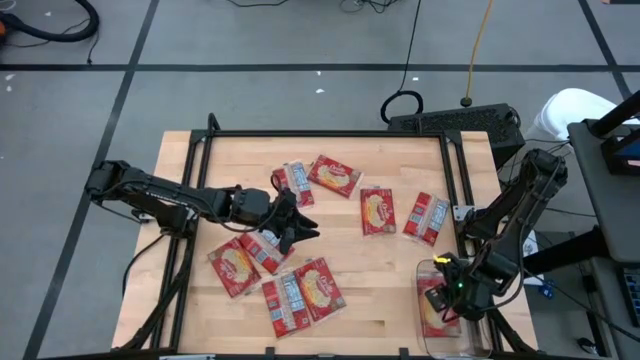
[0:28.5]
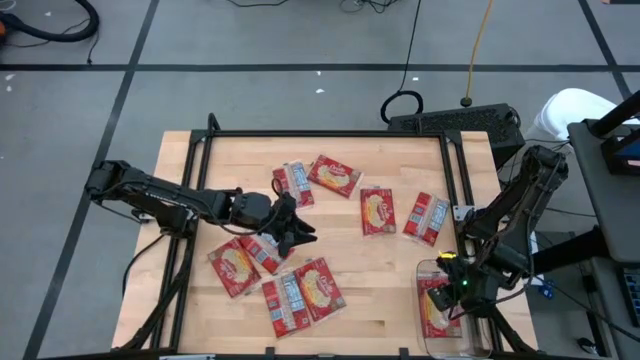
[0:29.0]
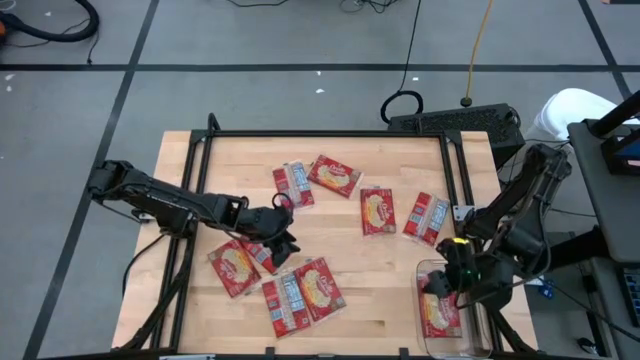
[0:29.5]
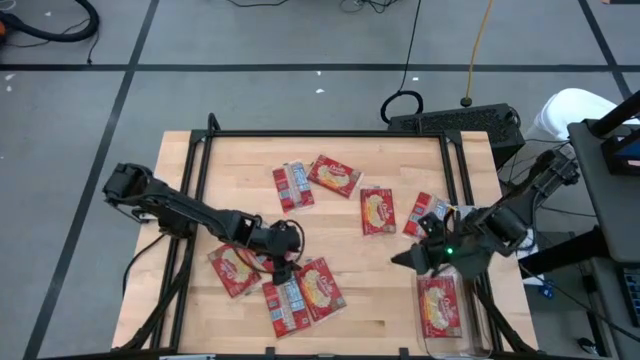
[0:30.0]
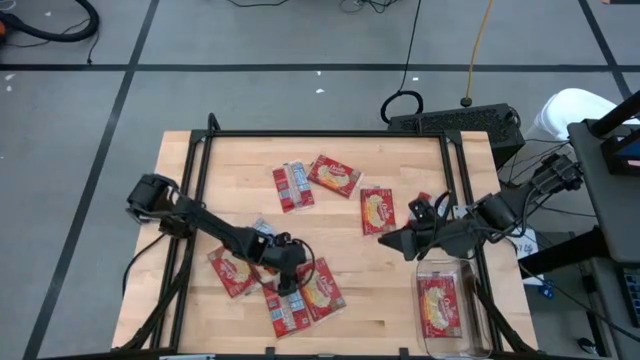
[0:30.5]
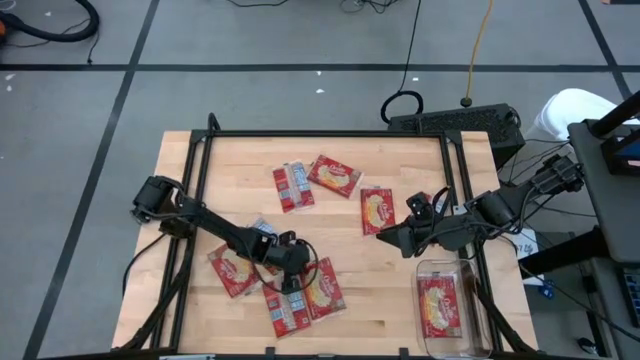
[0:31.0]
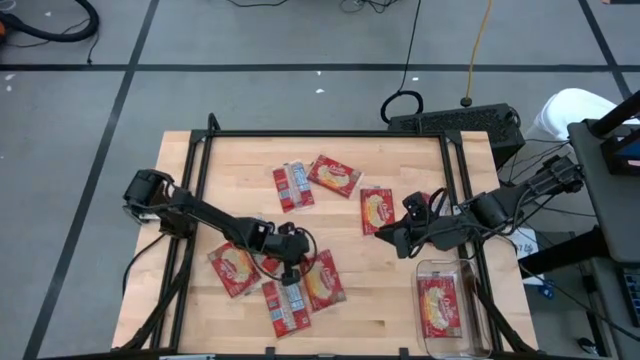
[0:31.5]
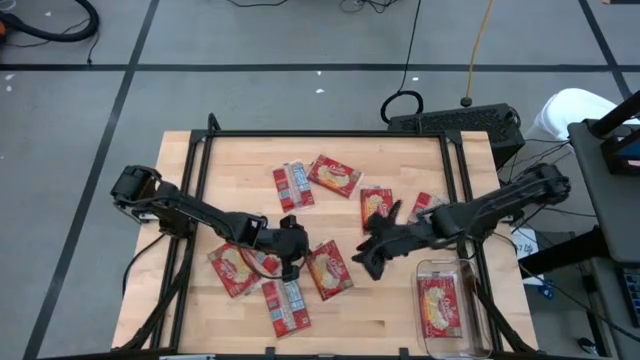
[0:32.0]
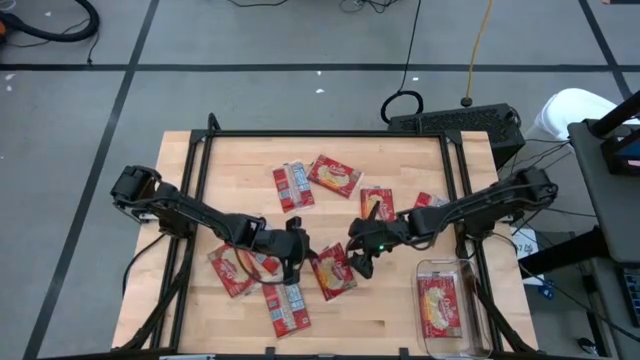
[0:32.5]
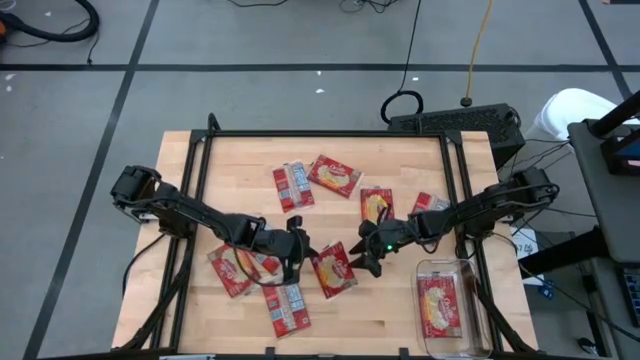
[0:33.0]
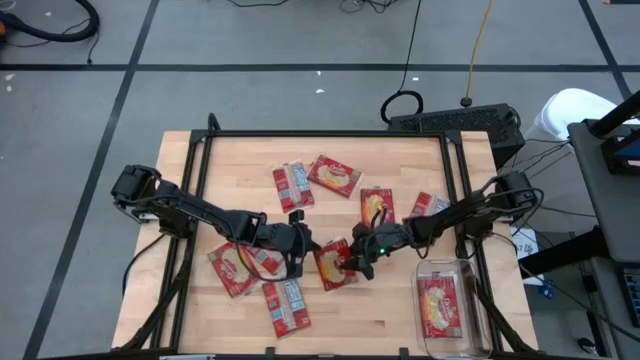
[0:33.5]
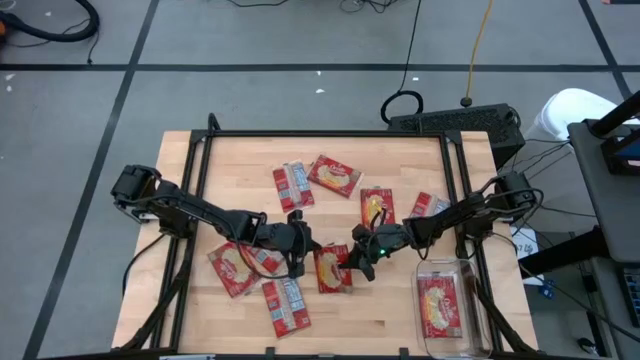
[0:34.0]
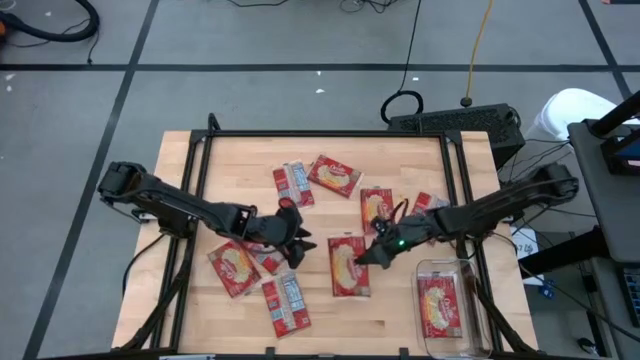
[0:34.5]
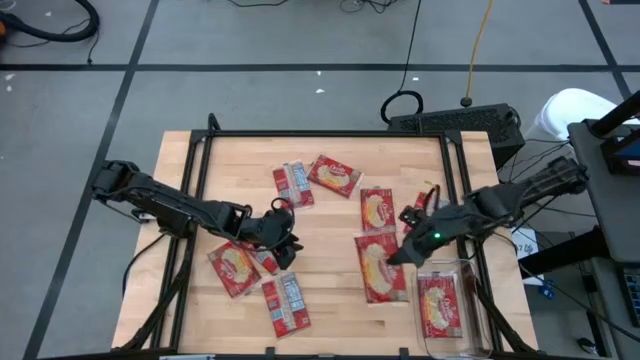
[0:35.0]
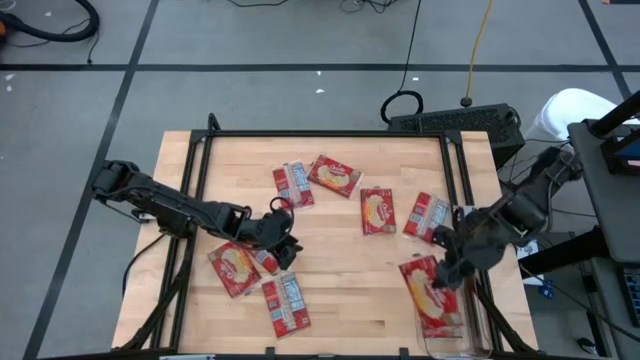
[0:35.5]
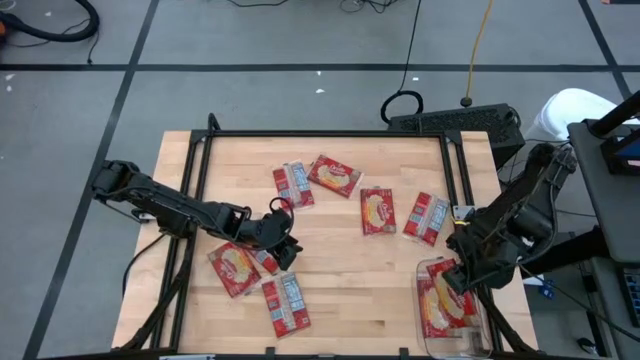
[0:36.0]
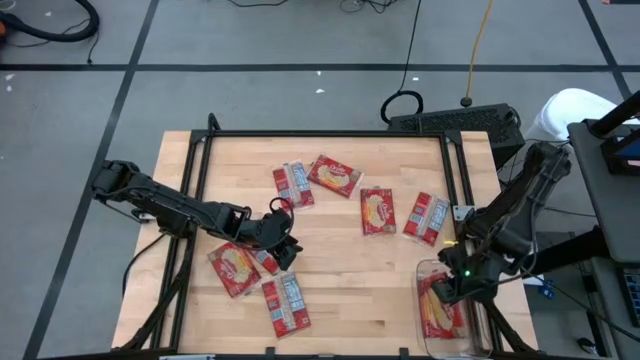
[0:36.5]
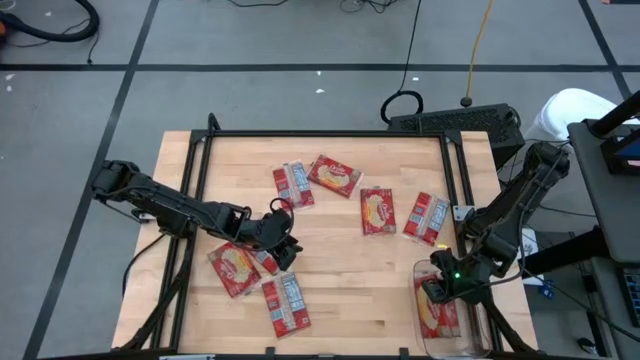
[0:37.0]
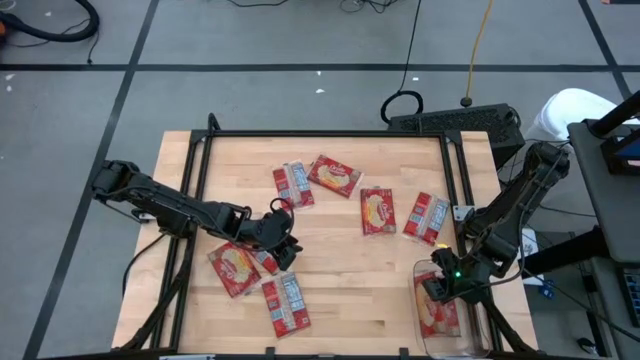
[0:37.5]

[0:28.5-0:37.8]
Task: Sort popcorn bags into baskets
Put the popcorn bag into the transparent bin

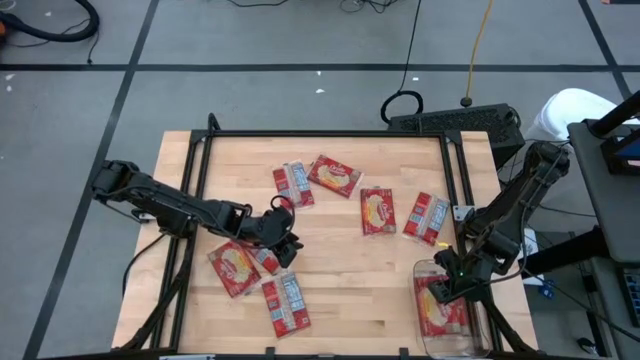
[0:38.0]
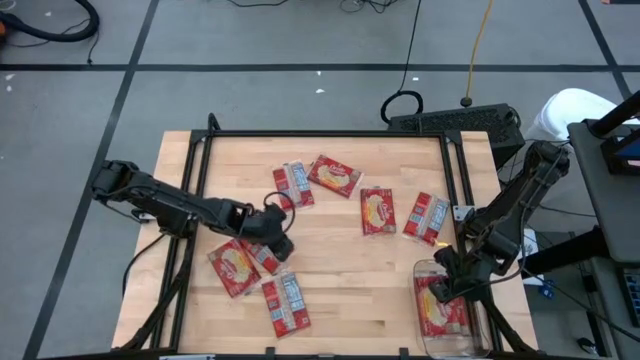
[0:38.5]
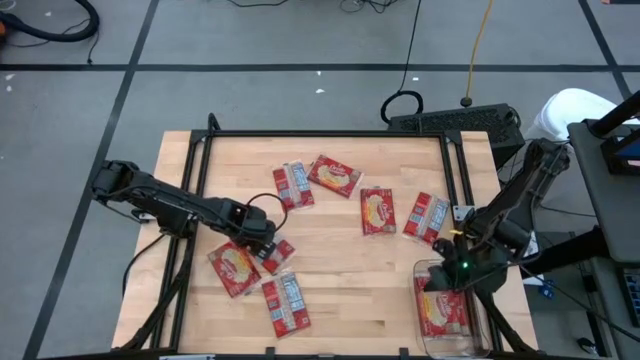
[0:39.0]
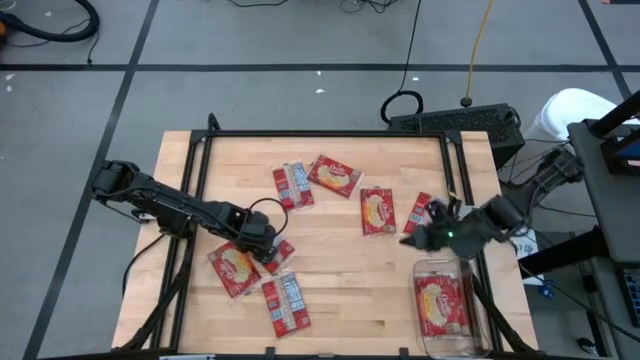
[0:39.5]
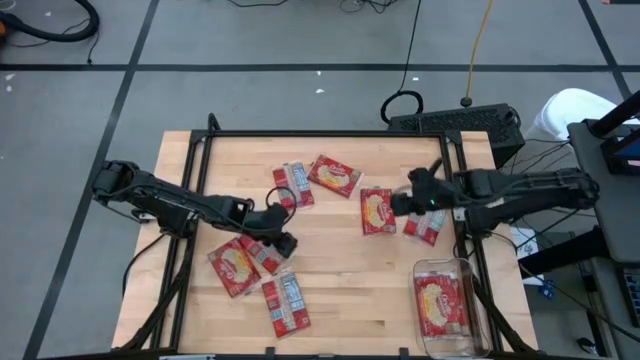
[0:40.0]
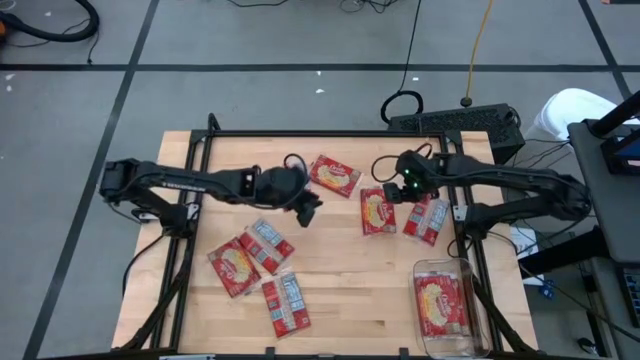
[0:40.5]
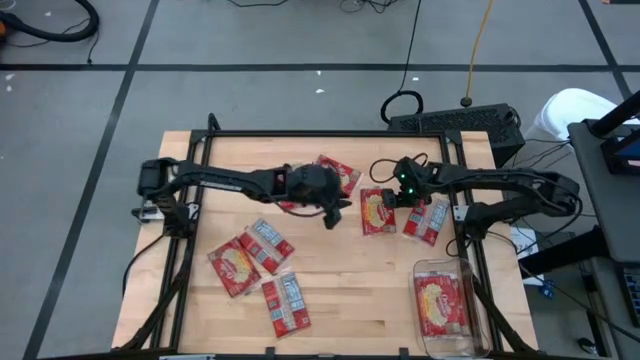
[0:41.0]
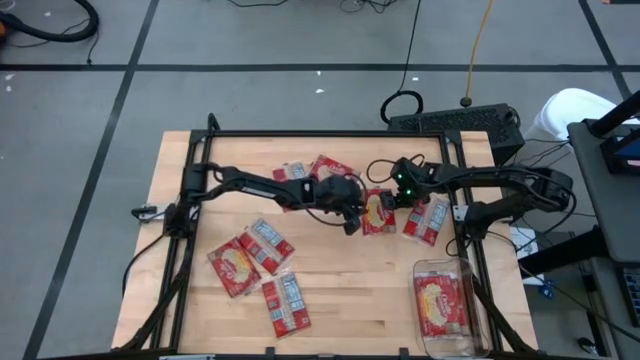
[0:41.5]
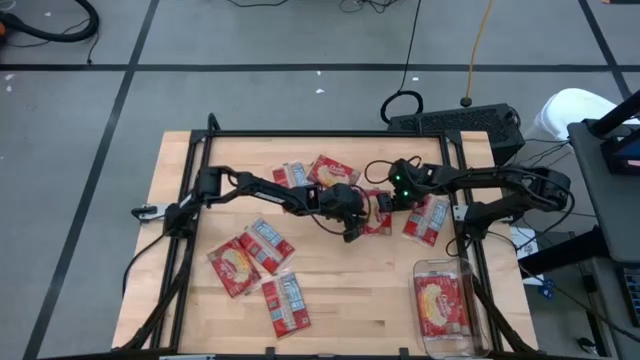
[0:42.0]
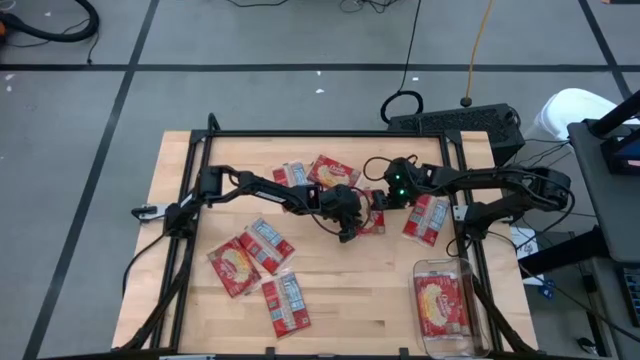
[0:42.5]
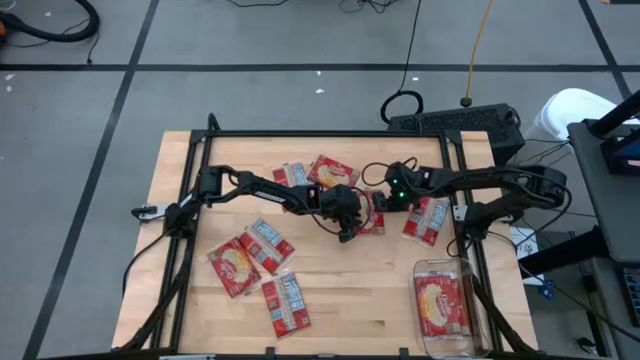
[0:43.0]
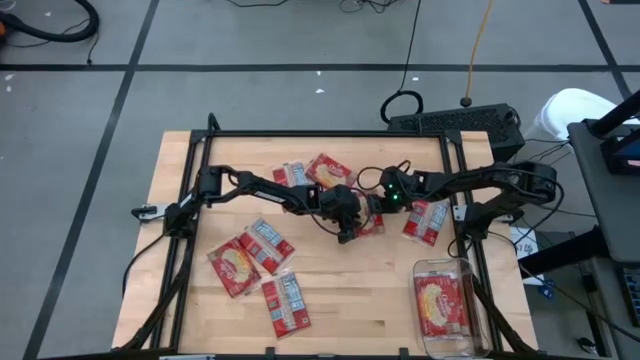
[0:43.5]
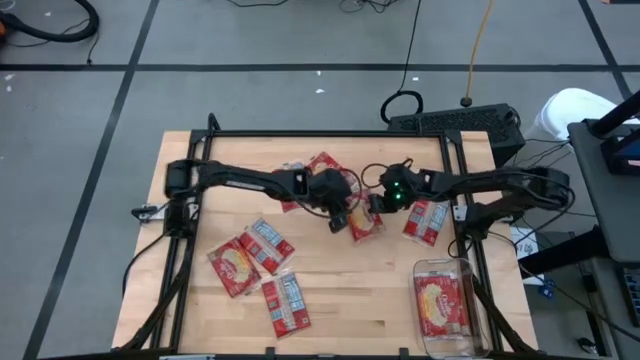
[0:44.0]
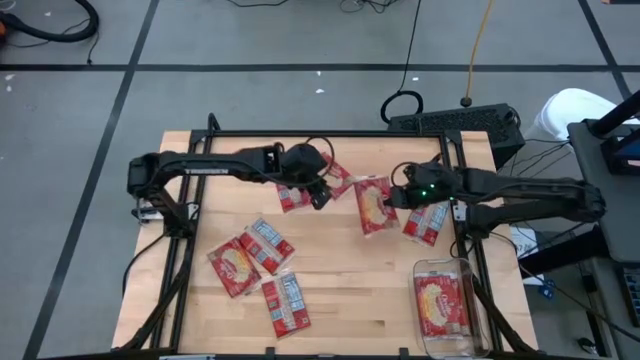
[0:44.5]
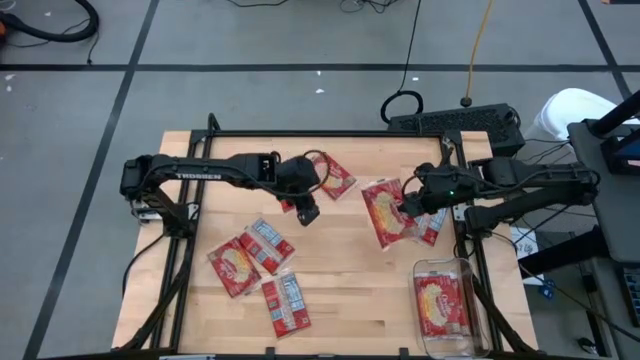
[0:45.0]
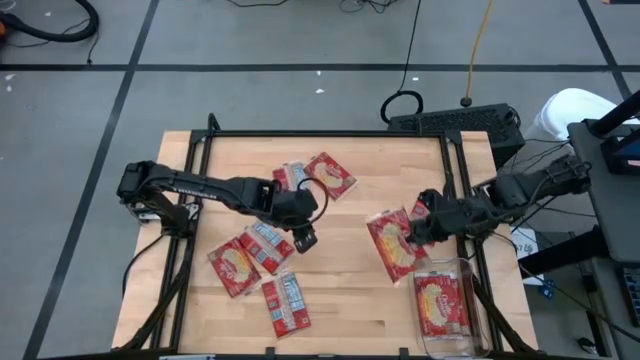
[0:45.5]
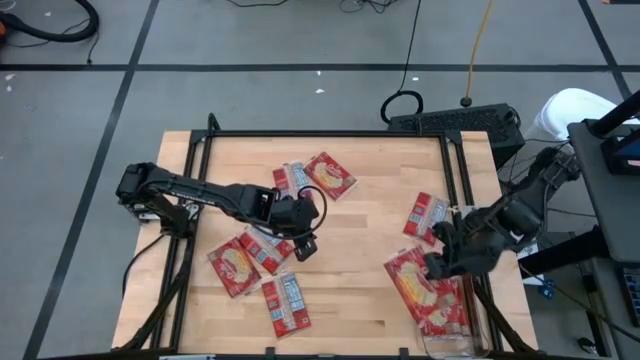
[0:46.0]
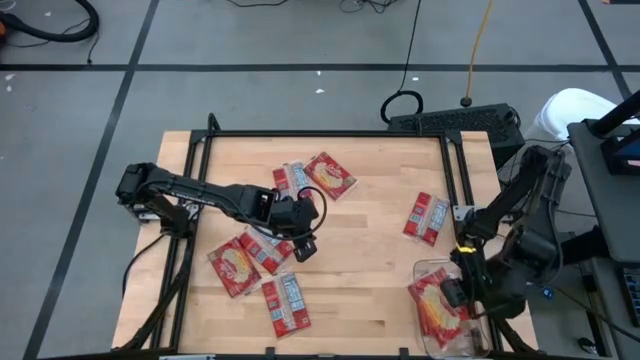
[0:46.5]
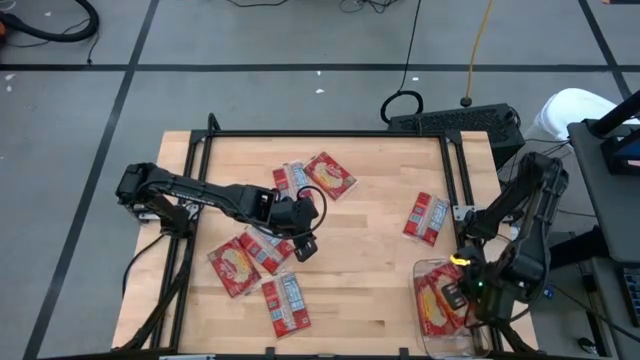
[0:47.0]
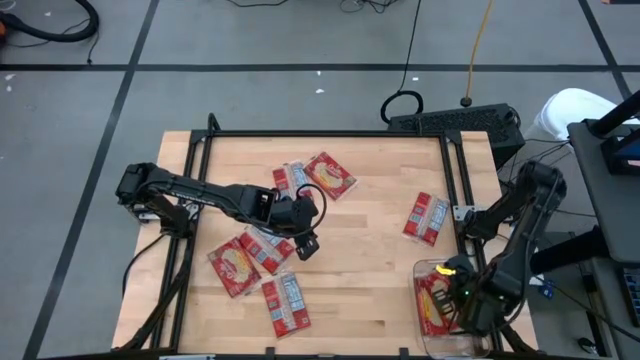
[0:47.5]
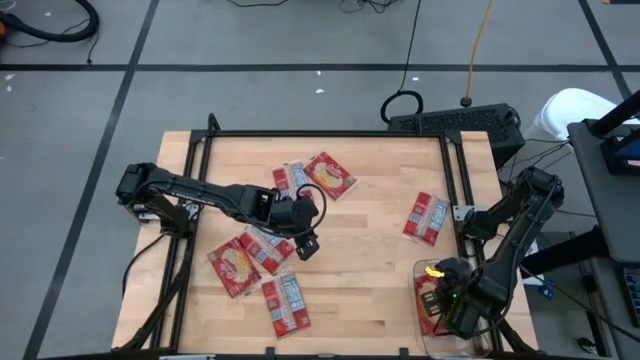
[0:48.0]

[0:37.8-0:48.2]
Put the popcorn bag into the transparent bin

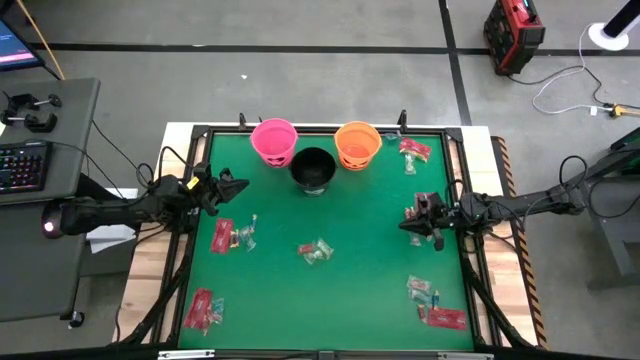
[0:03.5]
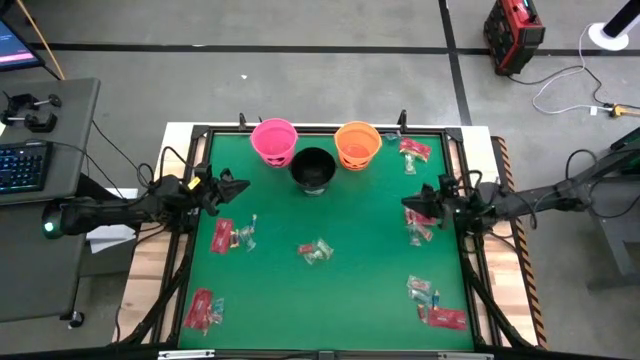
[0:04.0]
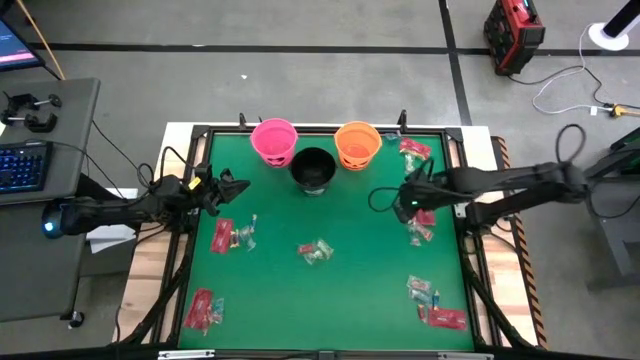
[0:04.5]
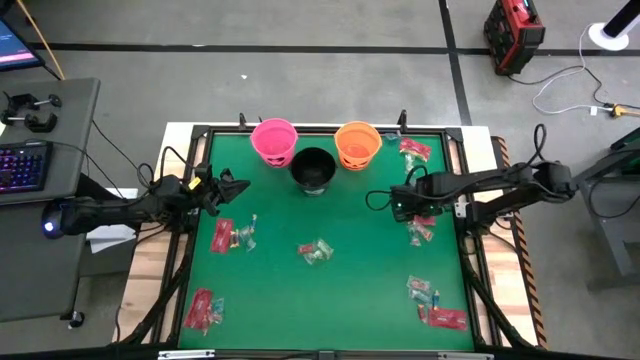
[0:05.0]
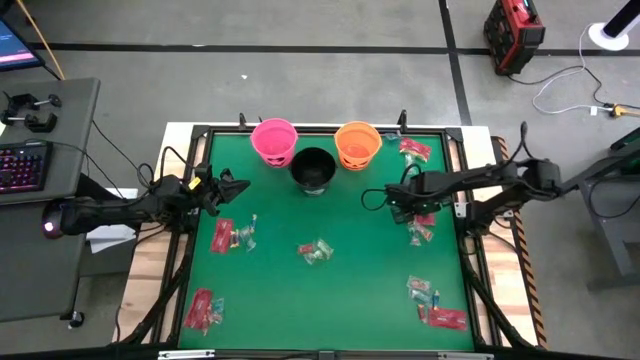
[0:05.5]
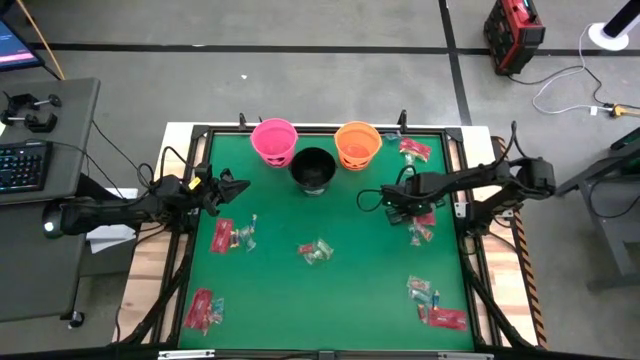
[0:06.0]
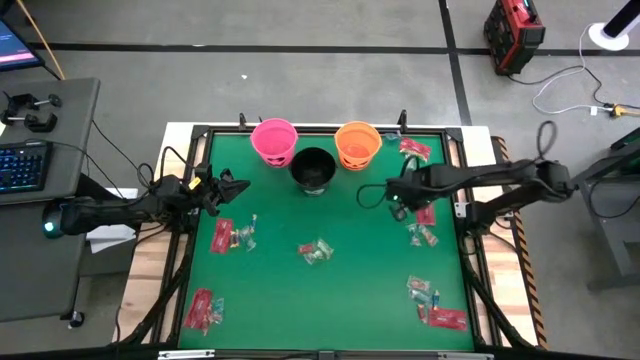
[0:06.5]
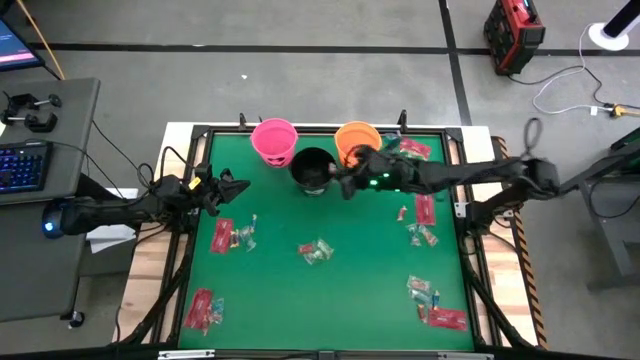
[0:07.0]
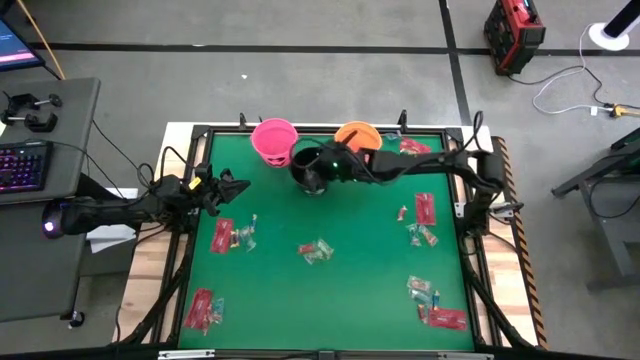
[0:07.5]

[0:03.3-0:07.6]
Task: Sort candy by brand, put in halloween buckets
Put the orange candy into the black bucket
